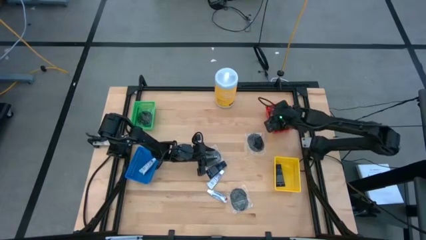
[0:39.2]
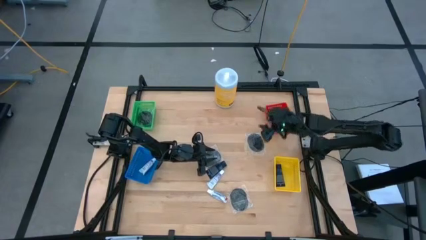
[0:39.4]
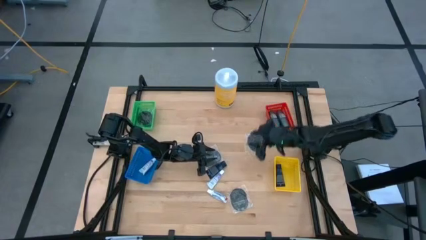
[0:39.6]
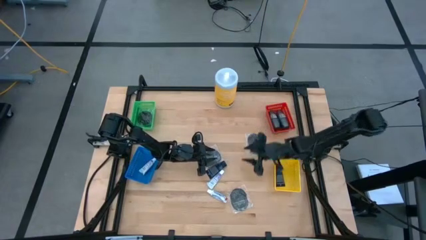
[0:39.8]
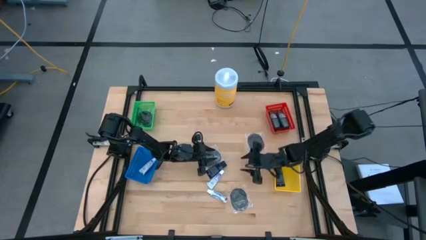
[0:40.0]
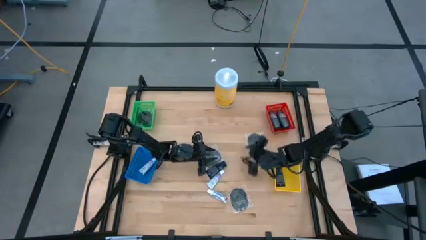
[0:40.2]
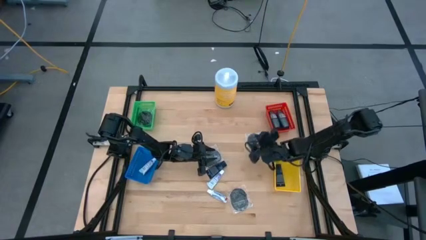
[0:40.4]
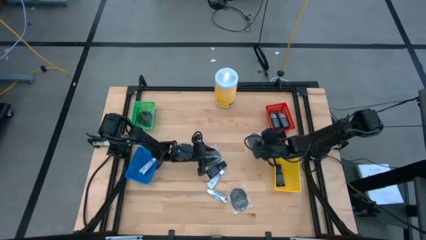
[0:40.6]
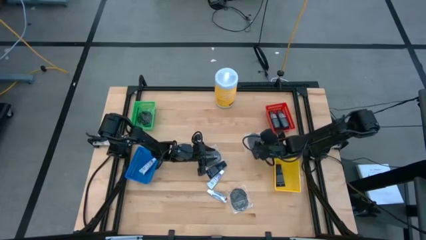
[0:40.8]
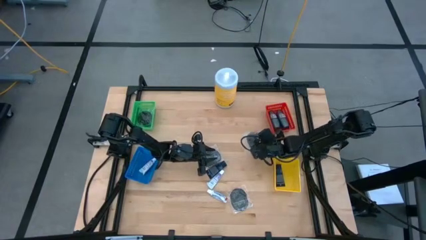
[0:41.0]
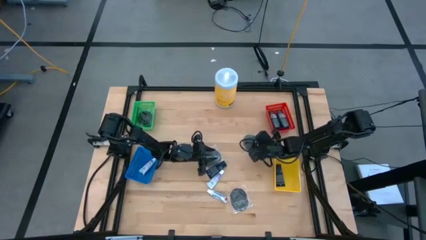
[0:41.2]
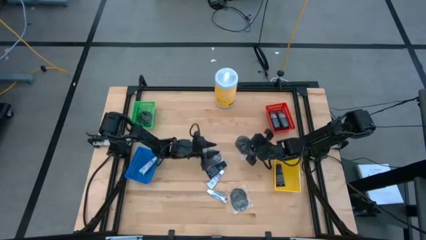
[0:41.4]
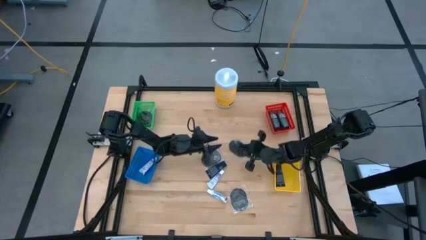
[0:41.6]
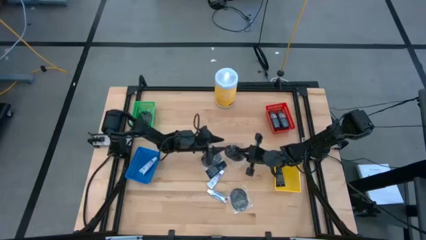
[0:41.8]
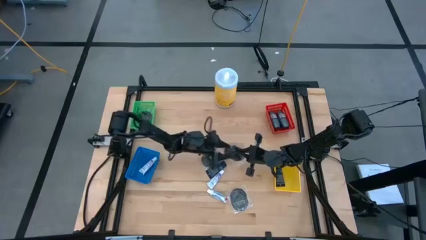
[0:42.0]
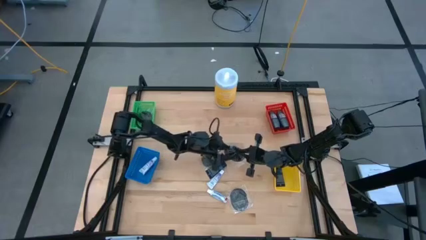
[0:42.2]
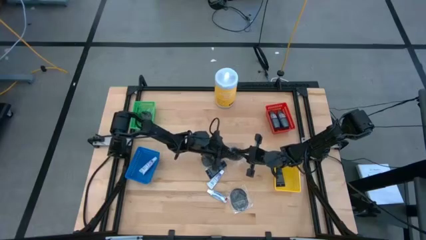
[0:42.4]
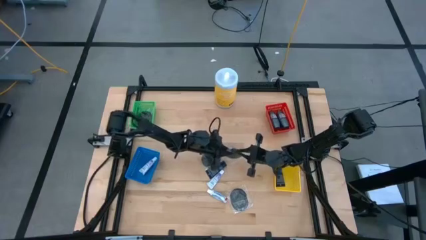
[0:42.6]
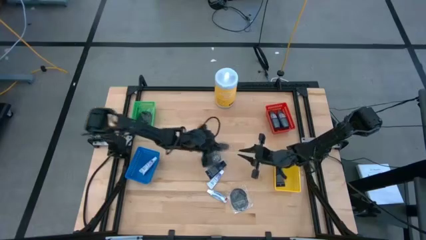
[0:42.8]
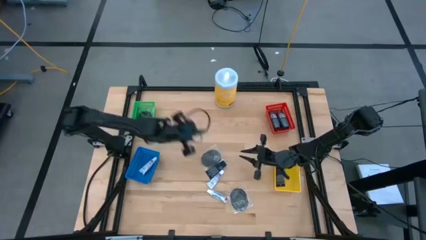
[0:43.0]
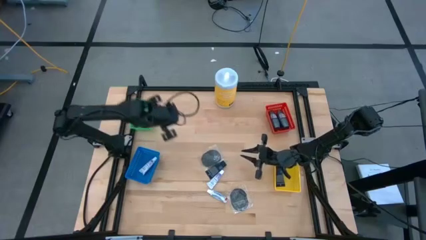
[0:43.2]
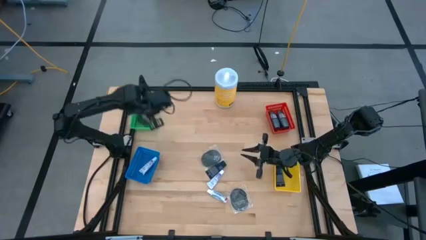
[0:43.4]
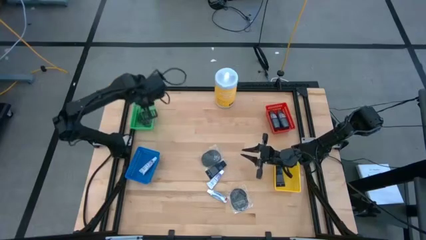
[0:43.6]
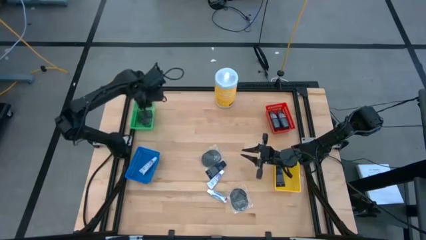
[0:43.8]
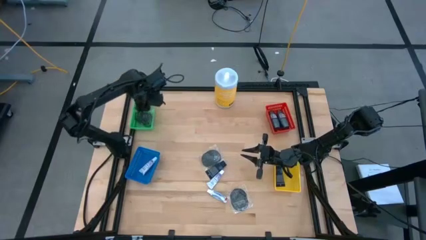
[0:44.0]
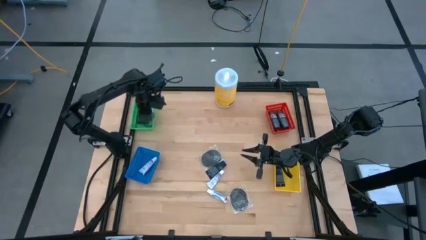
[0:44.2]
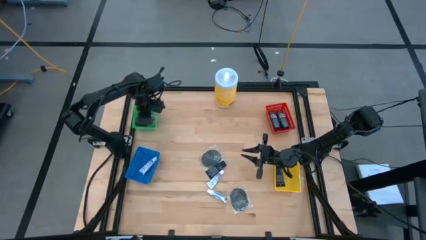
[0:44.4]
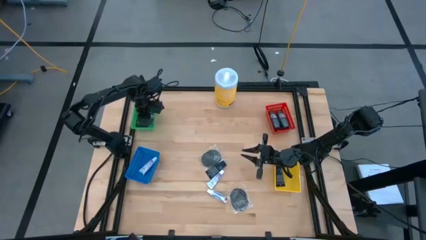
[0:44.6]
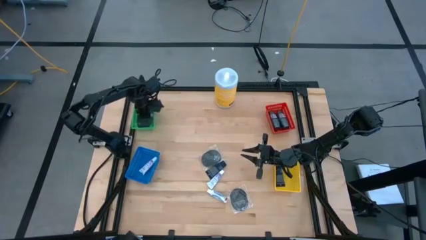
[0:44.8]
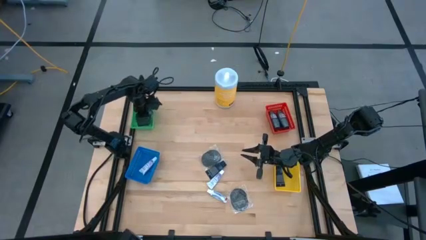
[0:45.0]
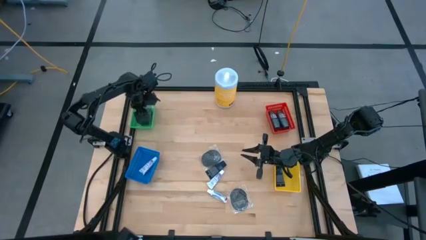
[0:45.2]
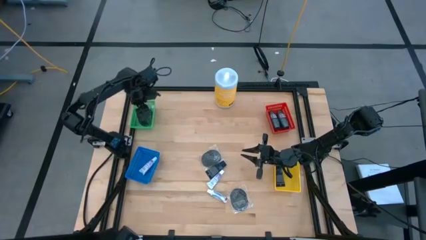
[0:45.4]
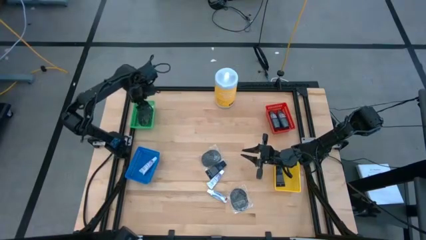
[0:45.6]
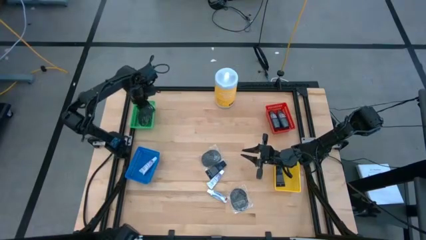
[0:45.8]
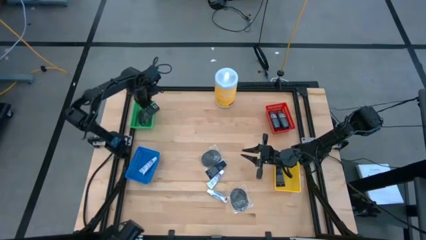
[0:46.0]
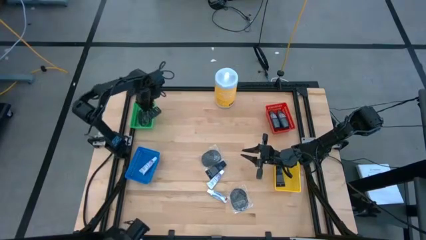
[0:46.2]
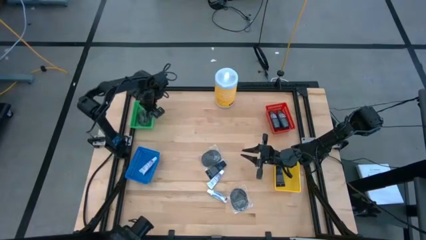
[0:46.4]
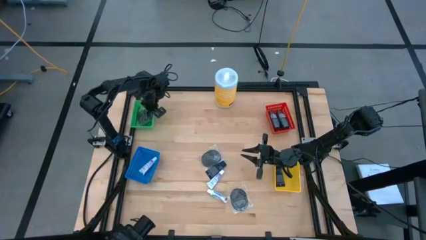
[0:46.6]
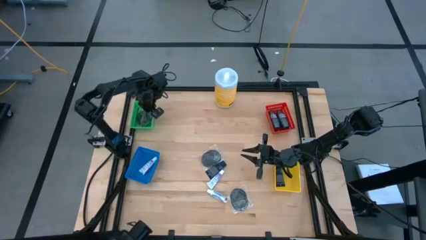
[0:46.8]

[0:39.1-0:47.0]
Task: Pick & Place Travel size toiletries
Put the hairbrush into the green bin

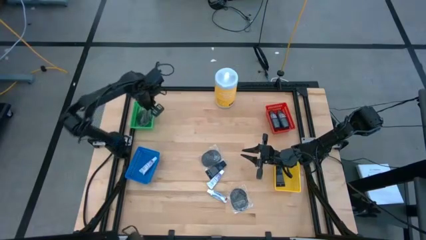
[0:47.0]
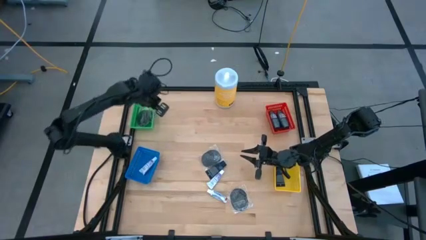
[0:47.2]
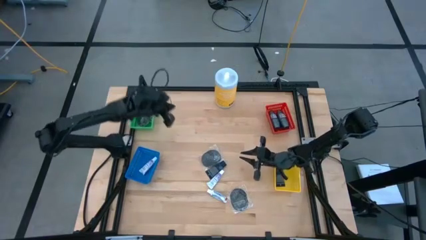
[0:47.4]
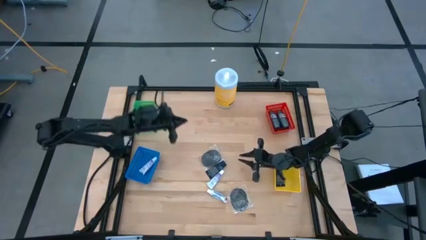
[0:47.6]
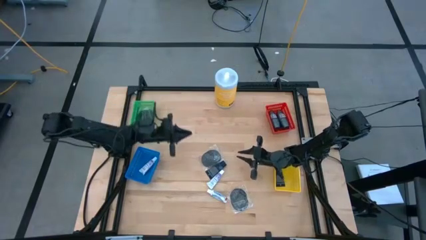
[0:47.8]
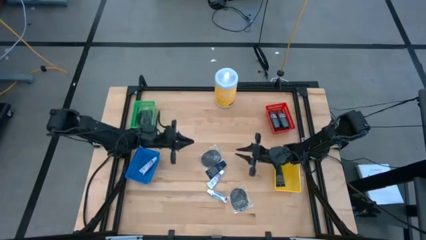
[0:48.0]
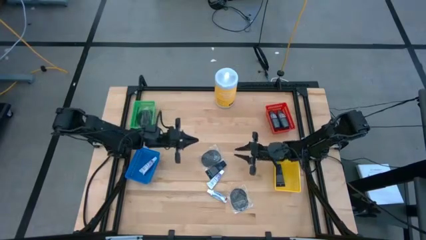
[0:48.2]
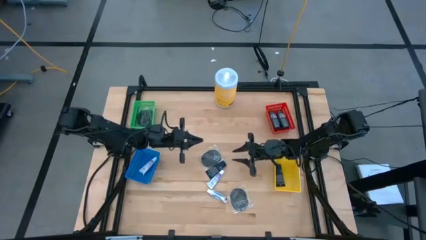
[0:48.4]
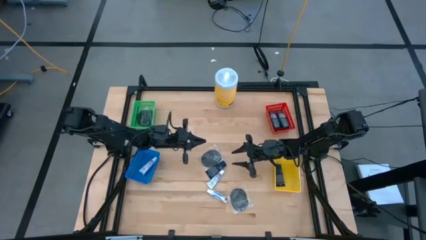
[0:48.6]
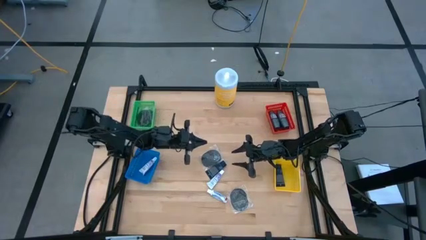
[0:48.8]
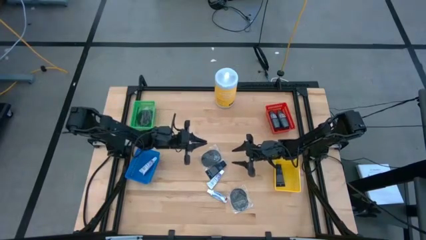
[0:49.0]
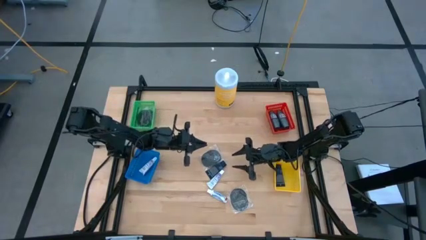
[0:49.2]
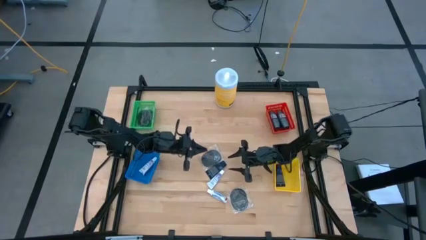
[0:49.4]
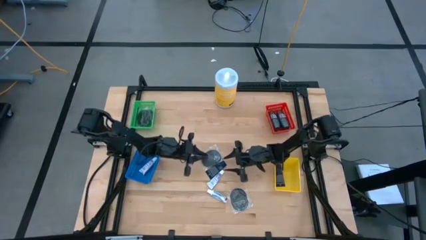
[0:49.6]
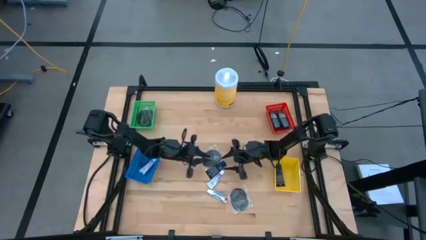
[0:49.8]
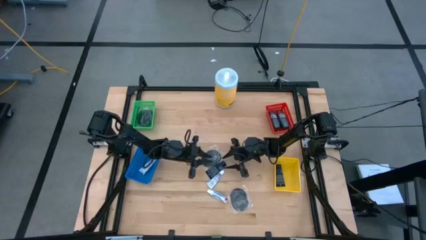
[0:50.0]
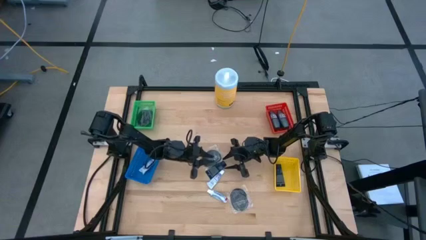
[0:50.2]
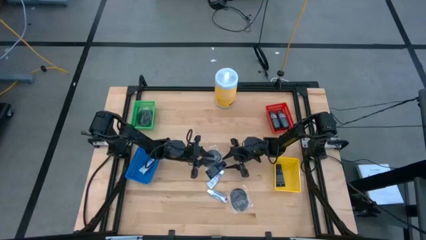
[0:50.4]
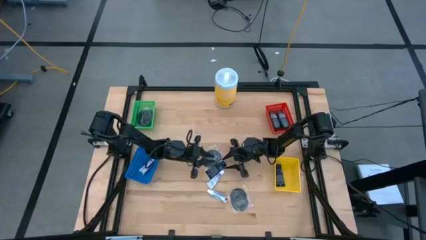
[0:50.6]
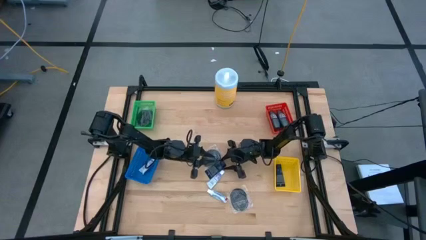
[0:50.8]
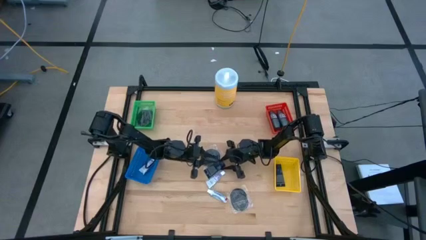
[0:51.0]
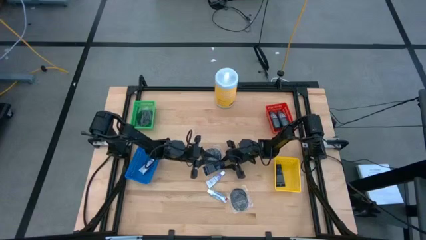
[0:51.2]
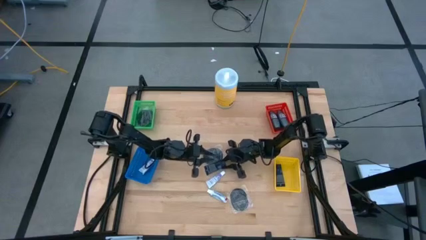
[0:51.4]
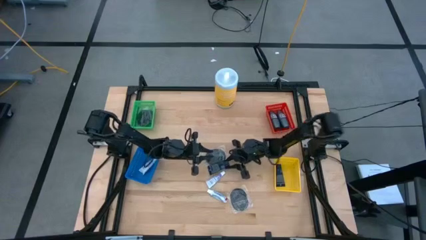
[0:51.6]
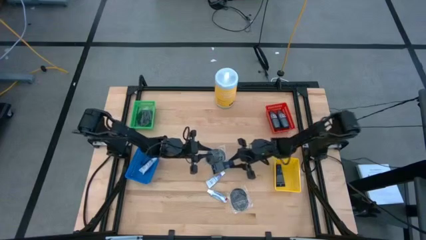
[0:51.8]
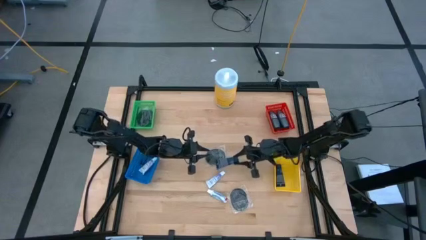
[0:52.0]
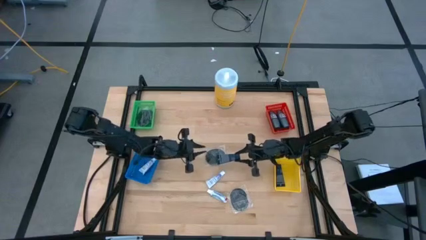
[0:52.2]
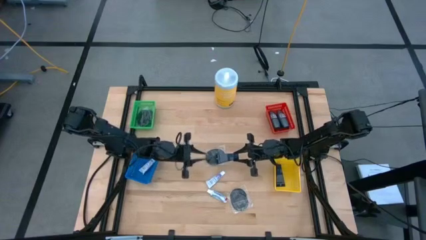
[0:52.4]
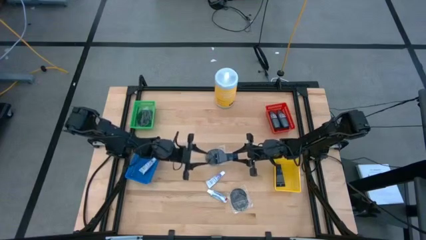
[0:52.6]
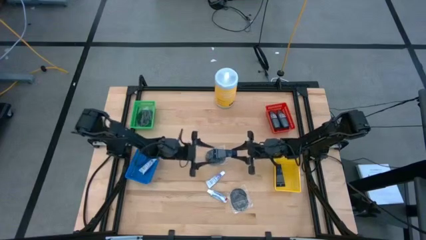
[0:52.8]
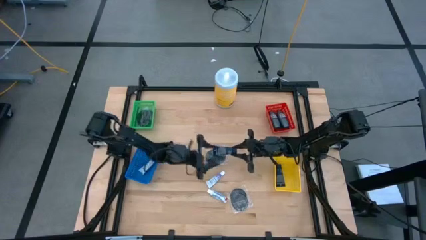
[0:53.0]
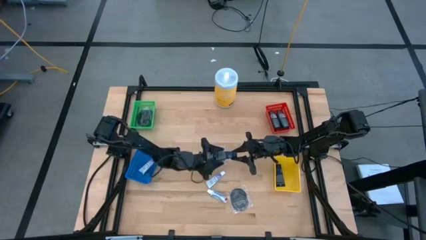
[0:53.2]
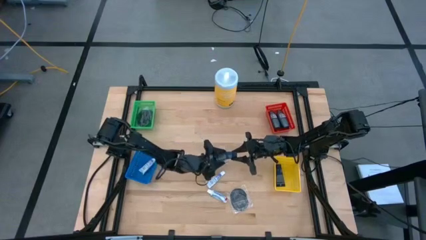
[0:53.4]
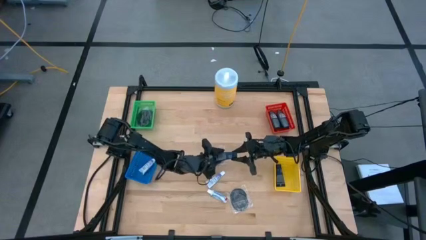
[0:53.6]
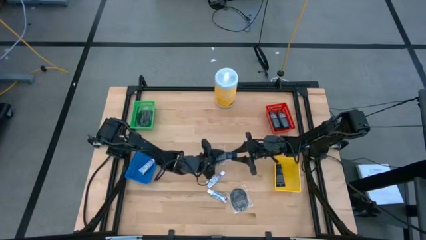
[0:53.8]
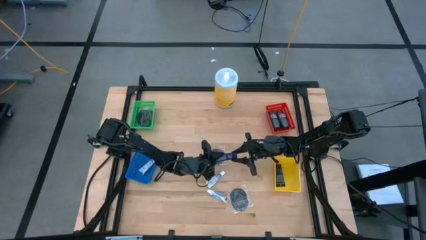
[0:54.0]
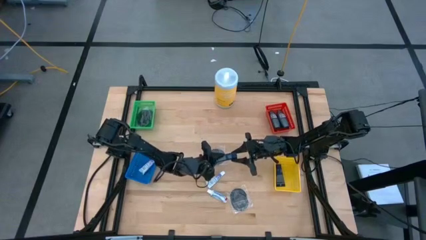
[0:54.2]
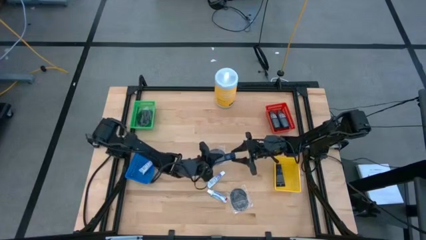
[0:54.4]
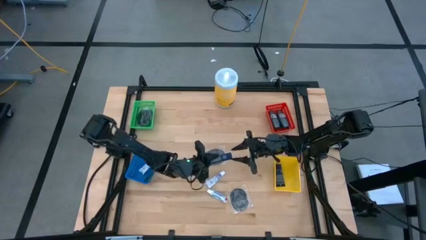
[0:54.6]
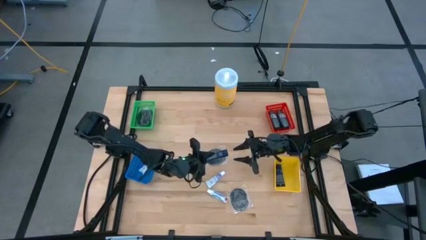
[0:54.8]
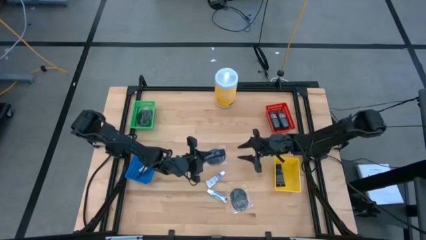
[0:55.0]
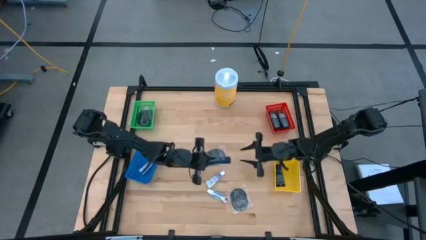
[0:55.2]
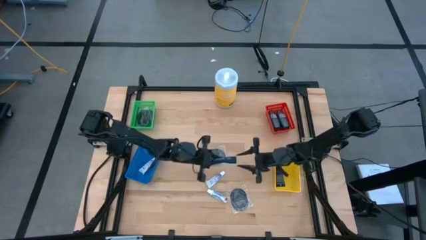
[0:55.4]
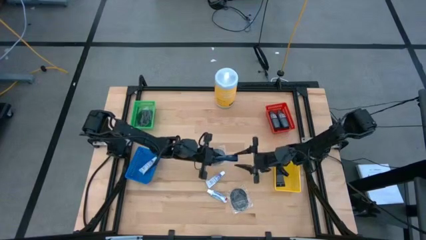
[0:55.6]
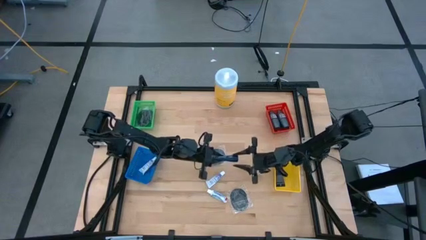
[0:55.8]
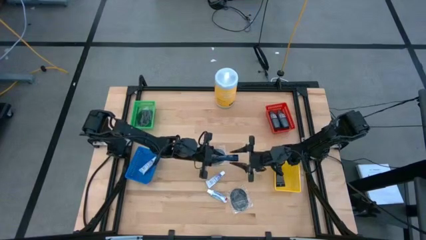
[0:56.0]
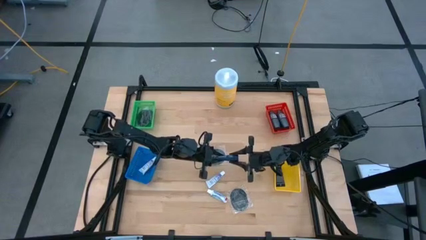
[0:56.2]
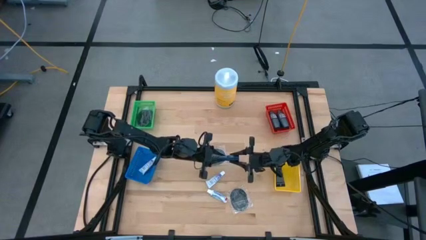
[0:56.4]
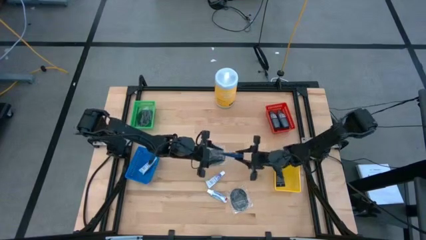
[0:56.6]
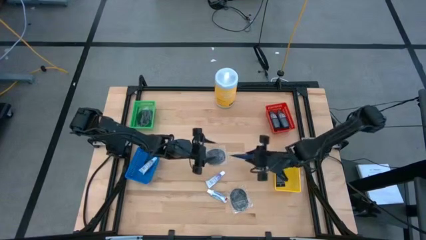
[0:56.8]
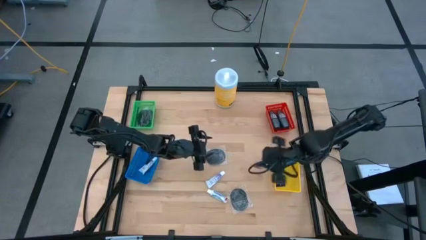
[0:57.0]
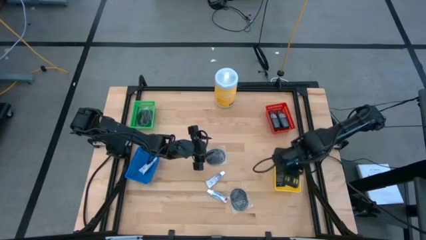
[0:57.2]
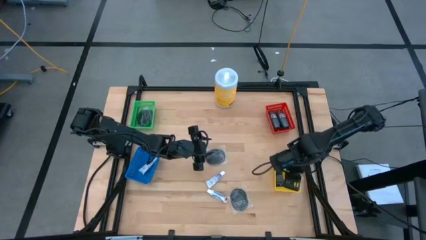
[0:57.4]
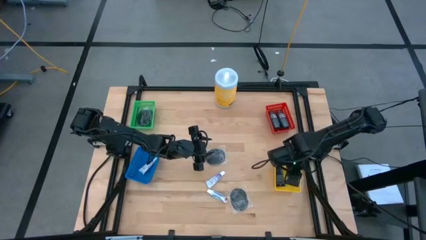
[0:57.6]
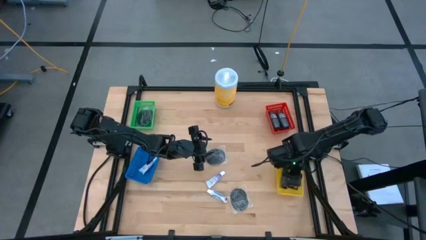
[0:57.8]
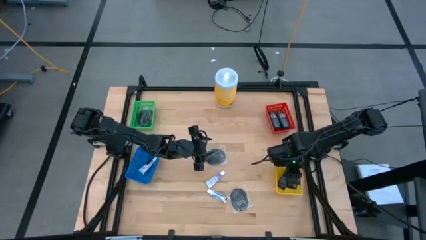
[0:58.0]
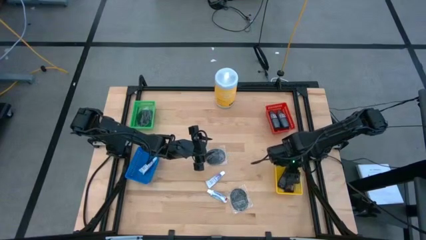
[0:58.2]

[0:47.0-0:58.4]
Put the shaving cream into the yellow bin
